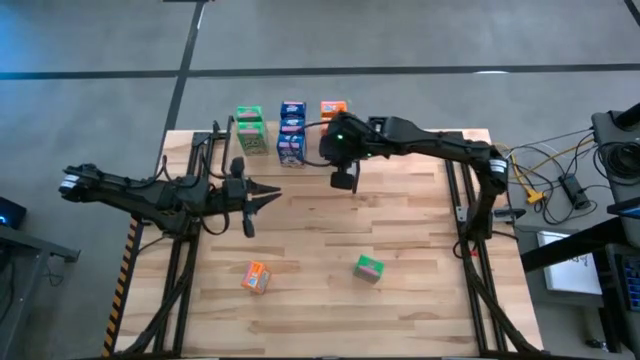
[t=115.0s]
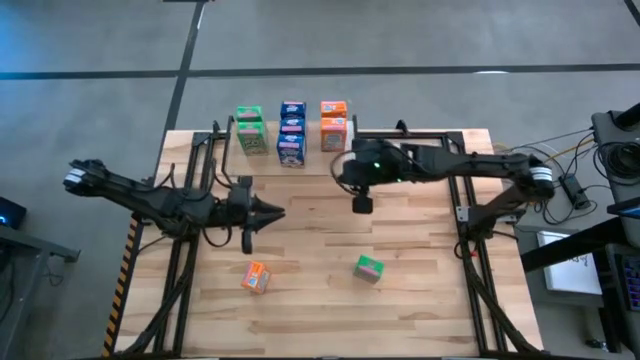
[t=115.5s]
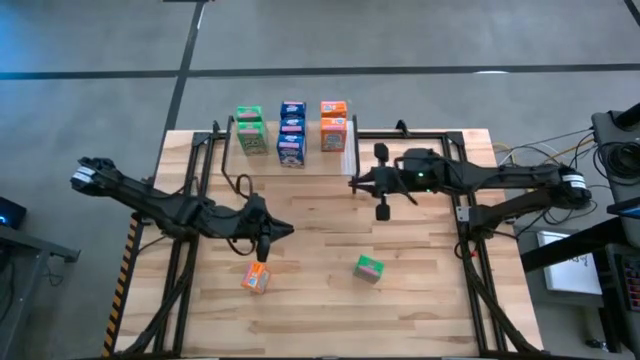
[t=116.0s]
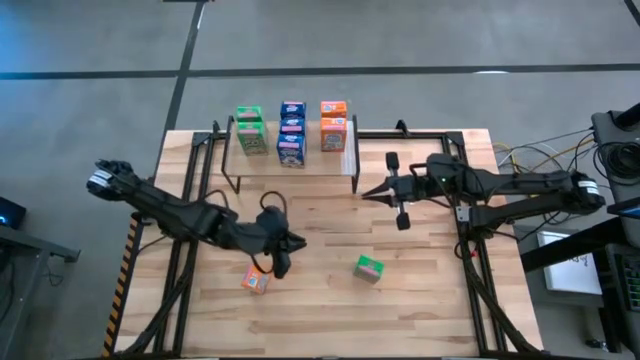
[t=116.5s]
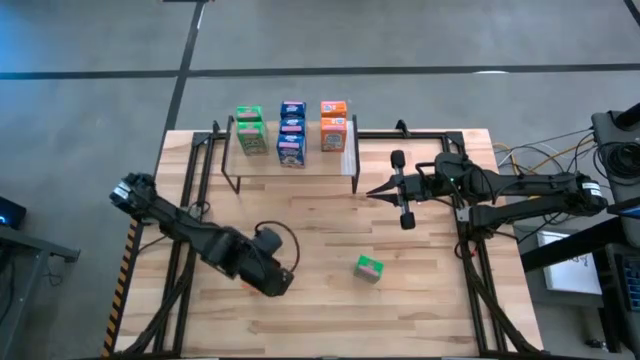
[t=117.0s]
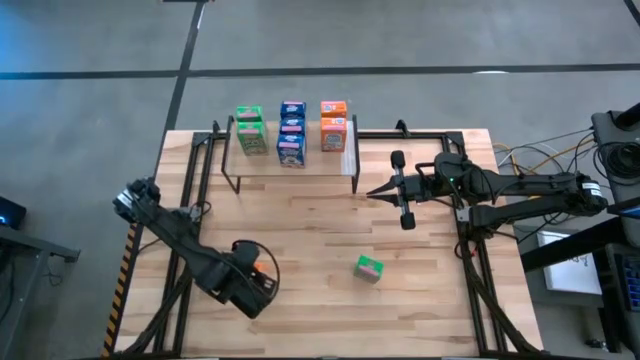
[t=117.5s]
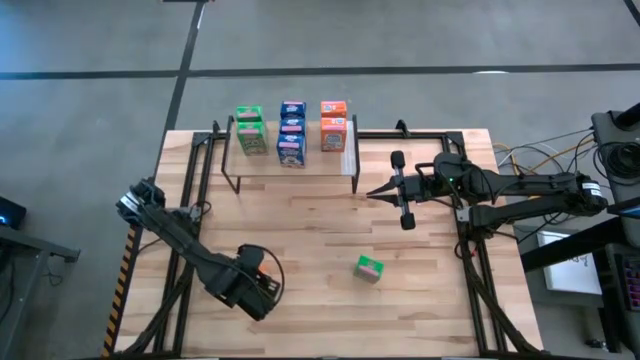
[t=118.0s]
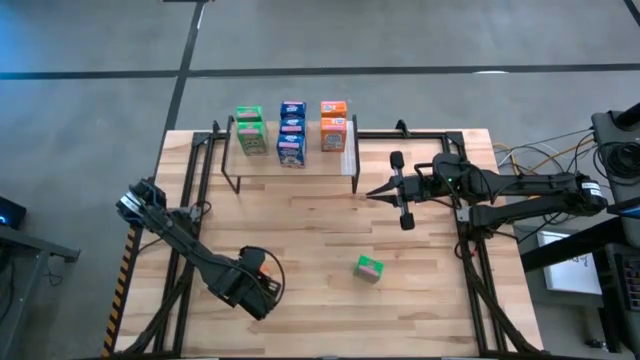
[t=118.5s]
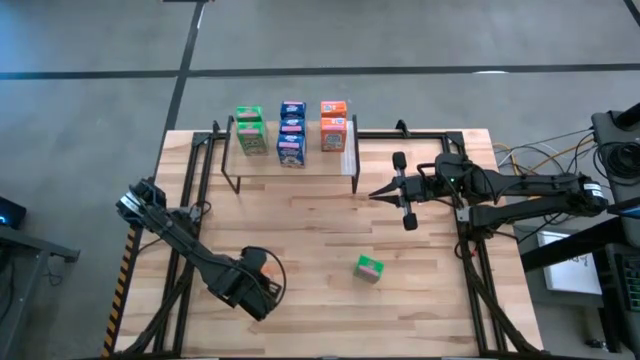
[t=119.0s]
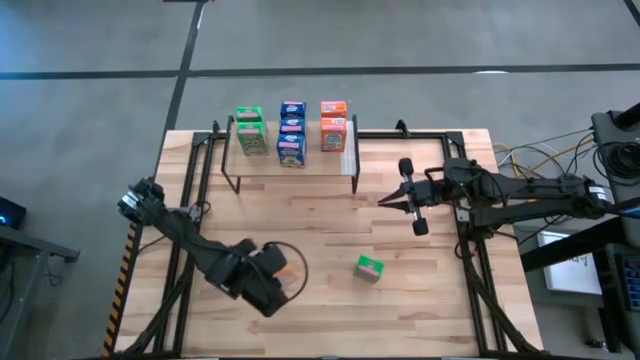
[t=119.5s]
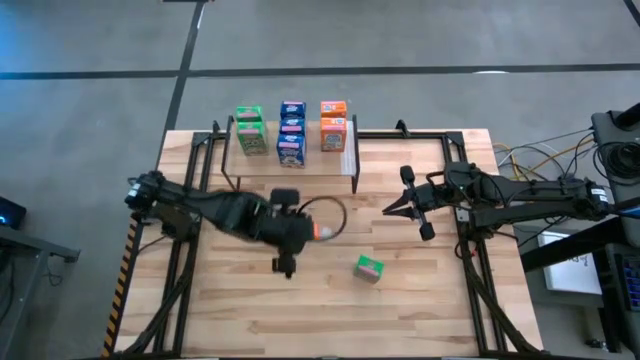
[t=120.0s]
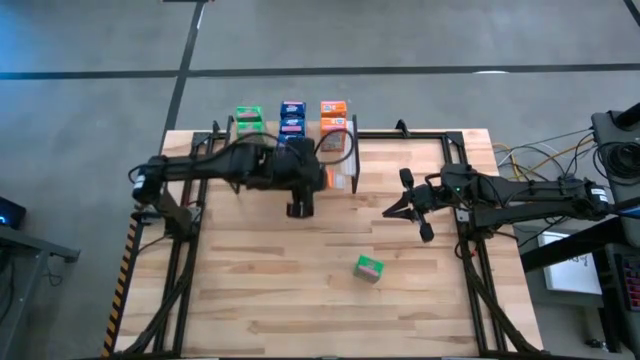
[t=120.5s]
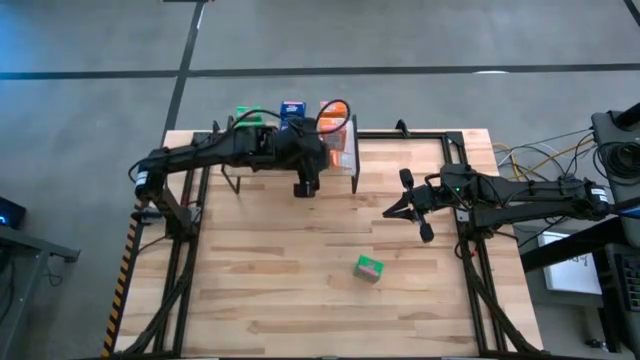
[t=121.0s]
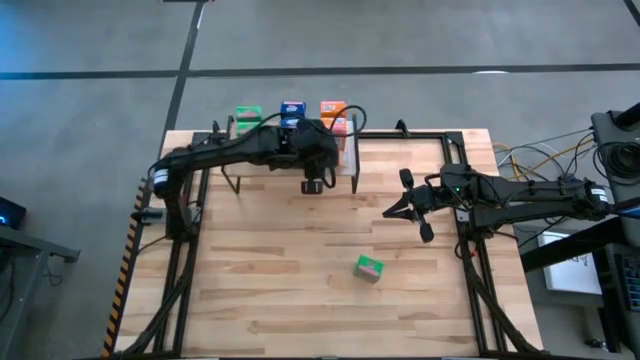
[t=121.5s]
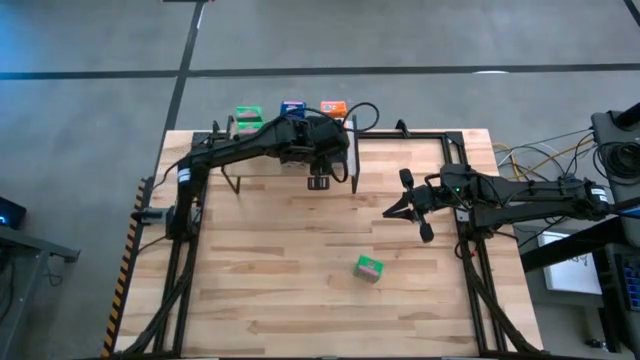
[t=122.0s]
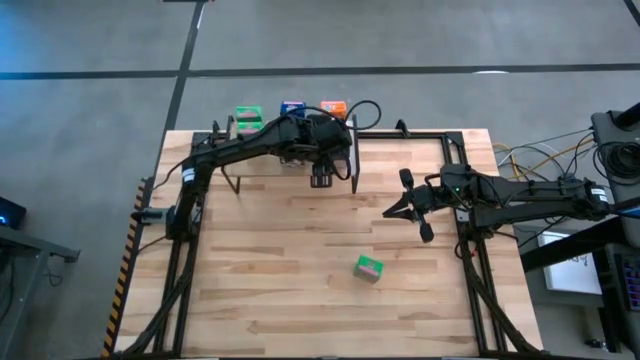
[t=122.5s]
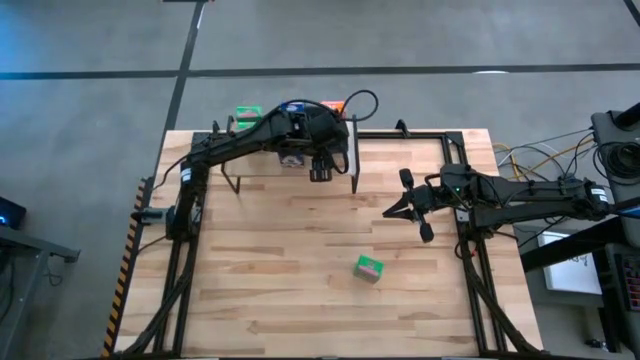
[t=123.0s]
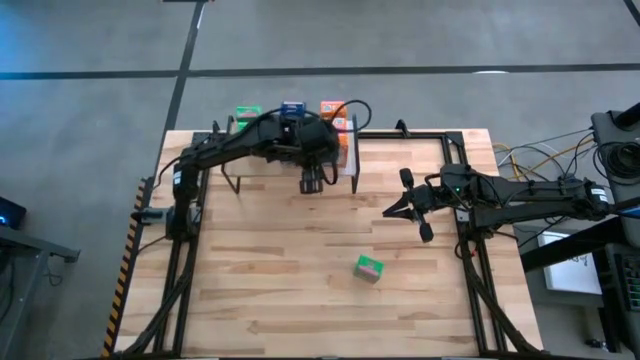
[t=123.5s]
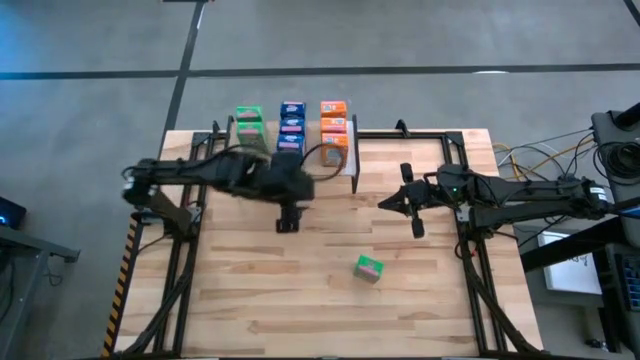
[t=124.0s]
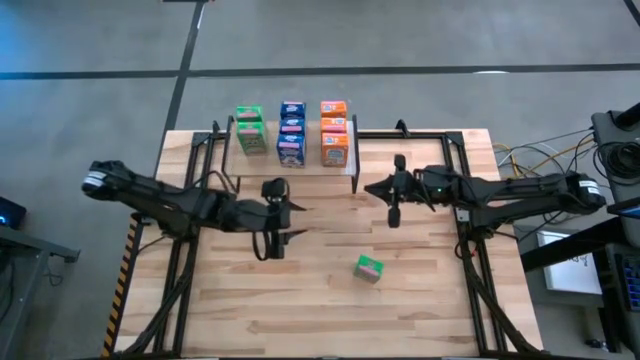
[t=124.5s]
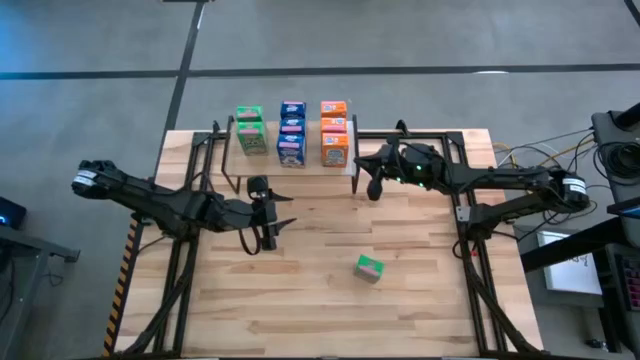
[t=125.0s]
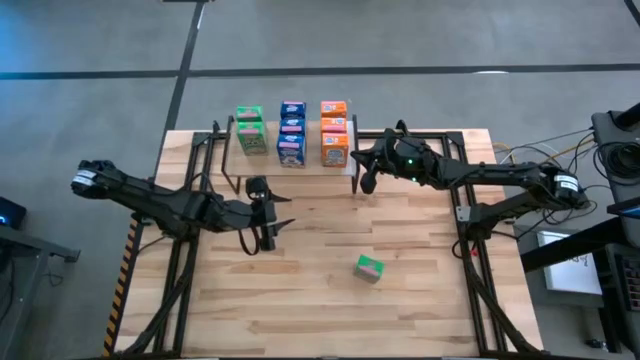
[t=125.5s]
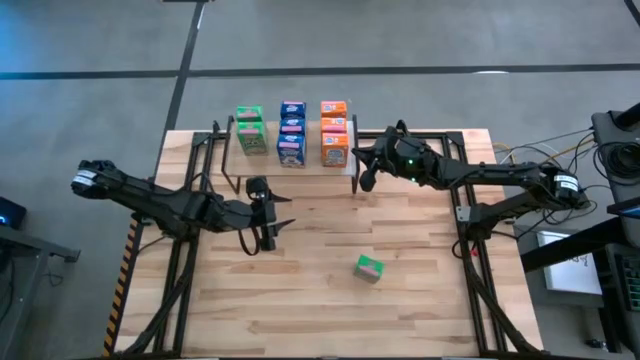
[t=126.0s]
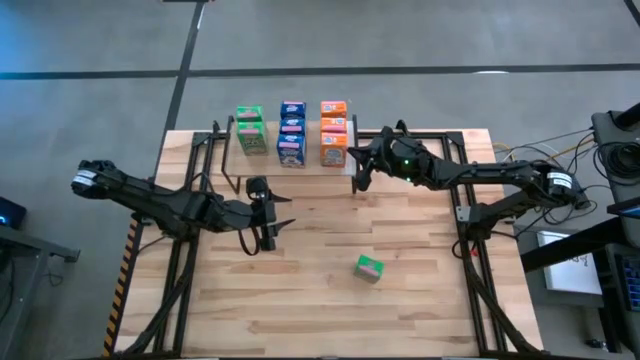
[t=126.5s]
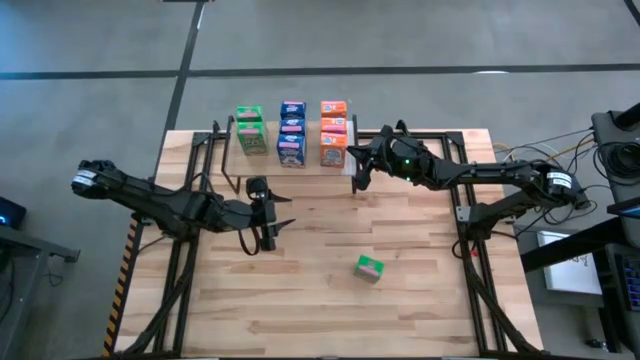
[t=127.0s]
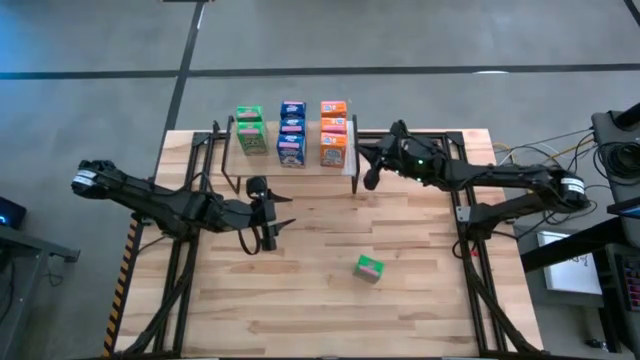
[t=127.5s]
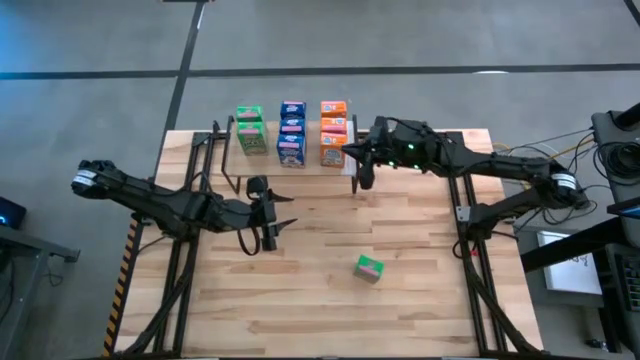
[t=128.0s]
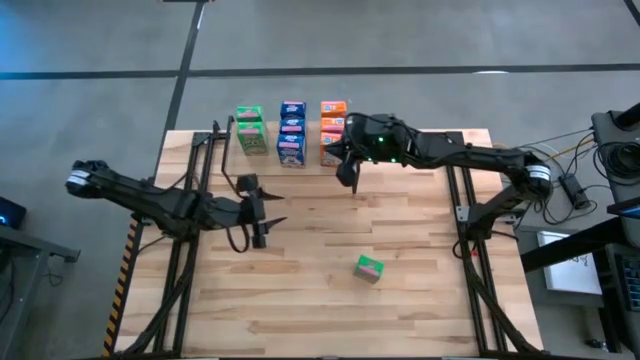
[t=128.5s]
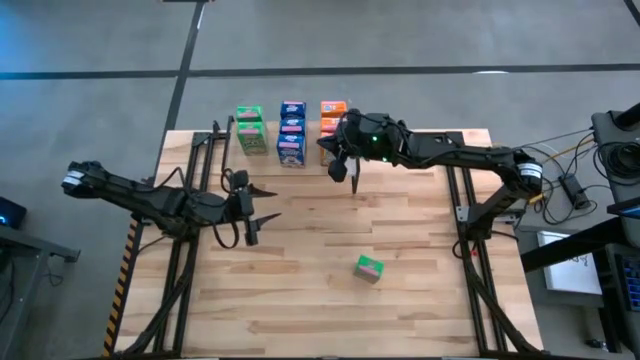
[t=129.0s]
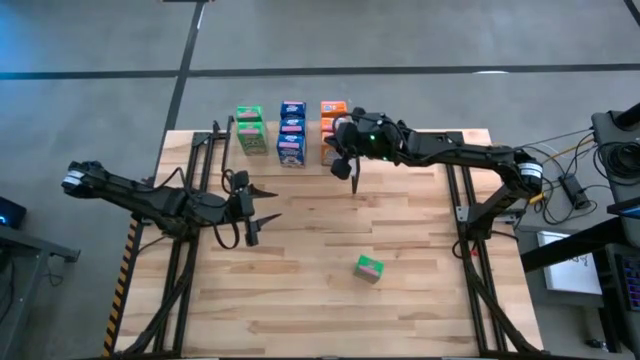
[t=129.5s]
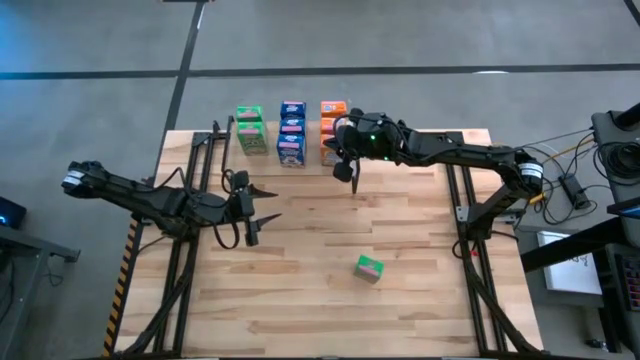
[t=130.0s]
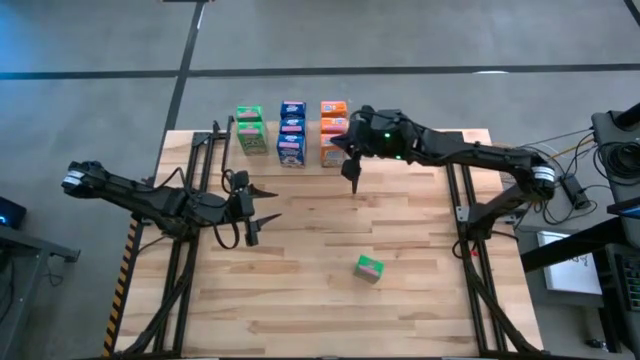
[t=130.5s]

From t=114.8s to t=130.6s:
Task: Stack cereal on shelf
Put the orange cereal box on the shelf aligned with the other orange cereal boxes

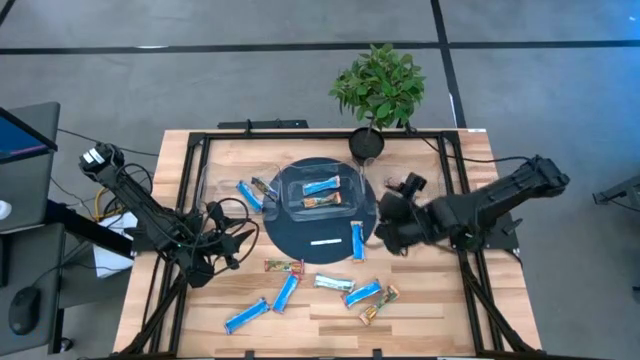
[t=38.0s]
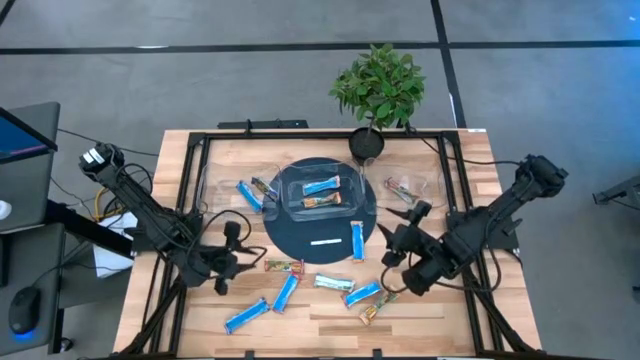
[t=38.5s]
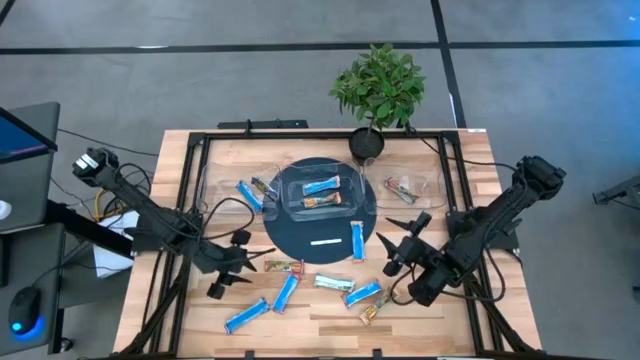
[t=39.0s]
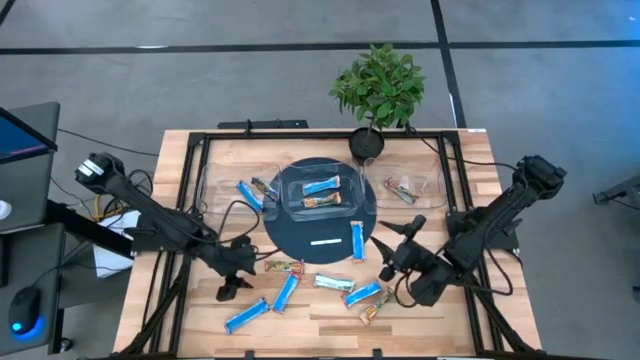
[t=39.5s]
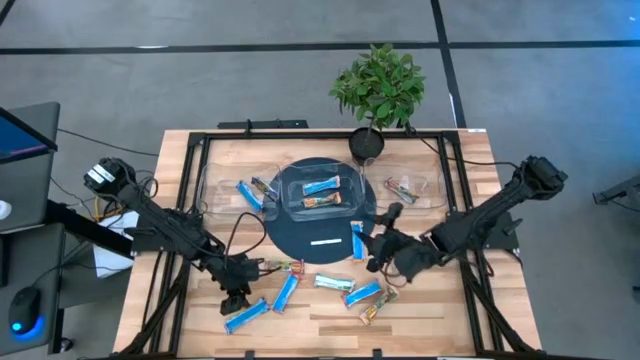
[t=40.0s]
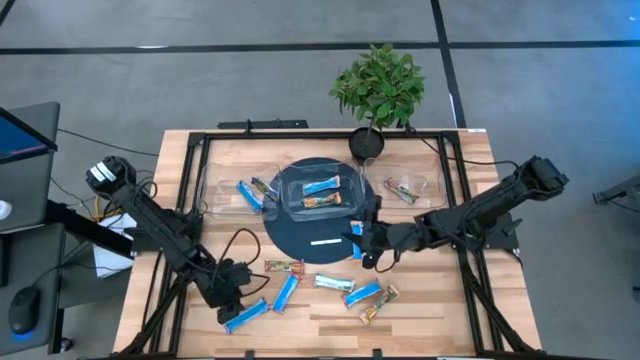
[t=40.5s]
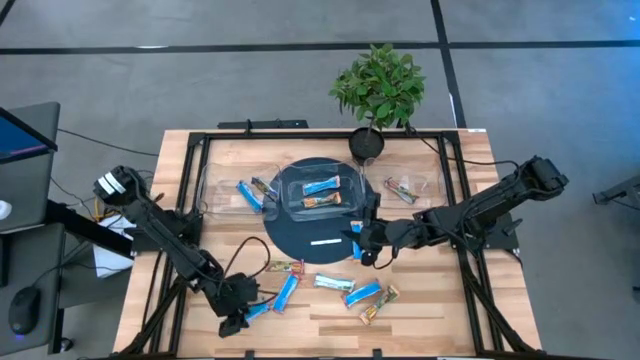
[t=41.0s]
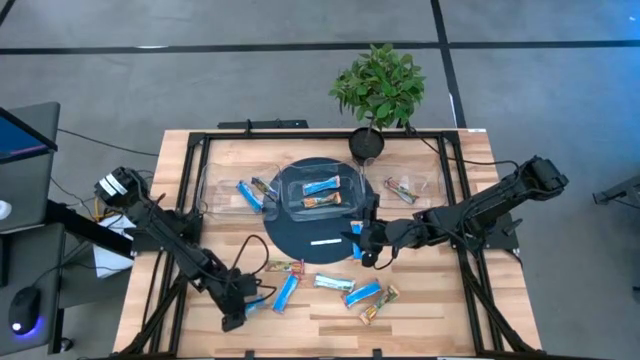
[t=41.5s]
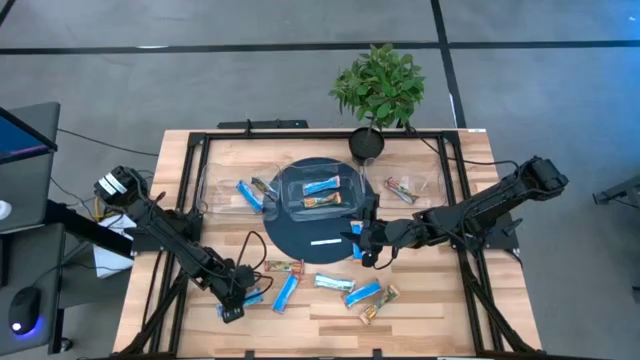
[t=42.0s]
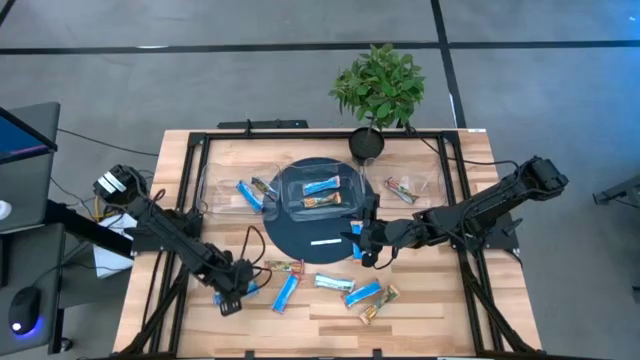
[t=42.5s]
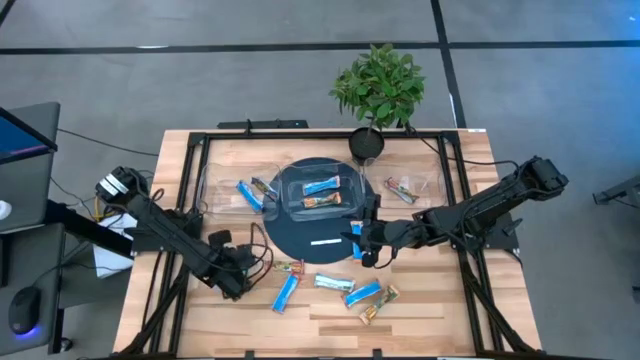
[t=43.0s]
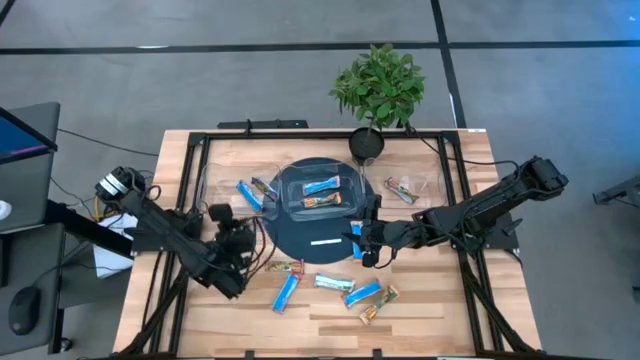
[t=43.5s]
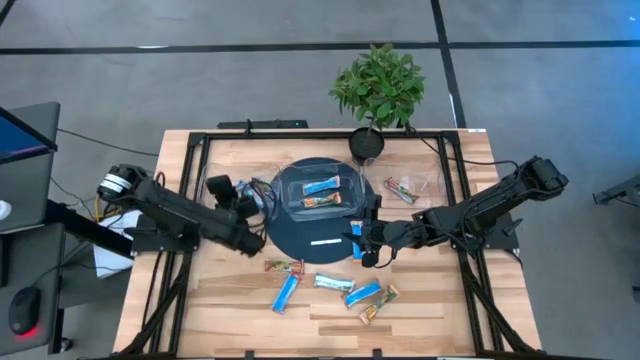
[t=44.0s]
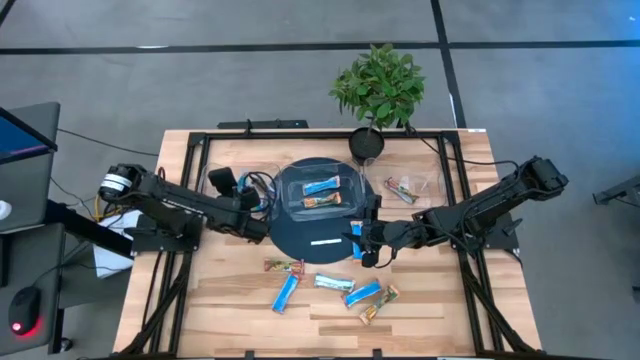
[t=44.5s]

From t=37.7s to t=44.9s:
Task: Pick and place Granola Bars by type
Put the bottom left blue snack bar into the left transparent bin
